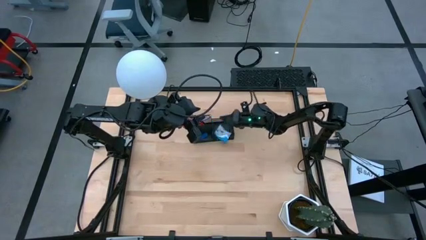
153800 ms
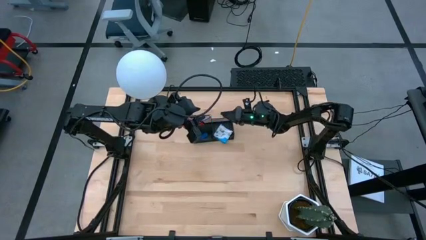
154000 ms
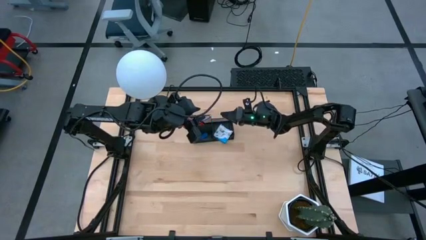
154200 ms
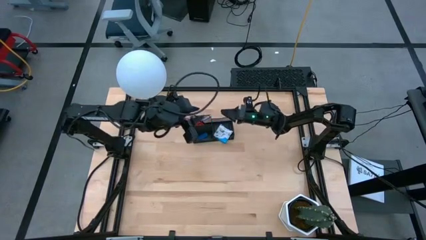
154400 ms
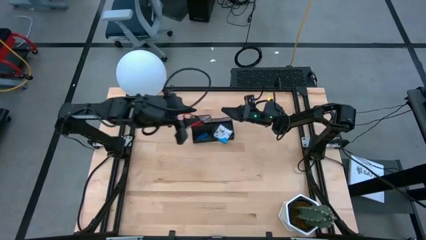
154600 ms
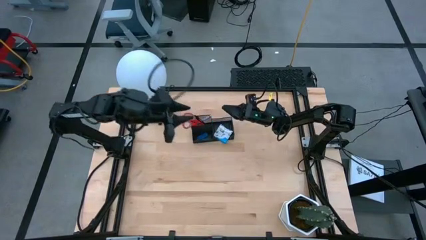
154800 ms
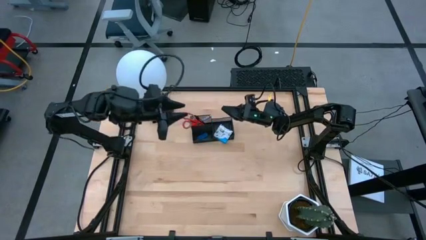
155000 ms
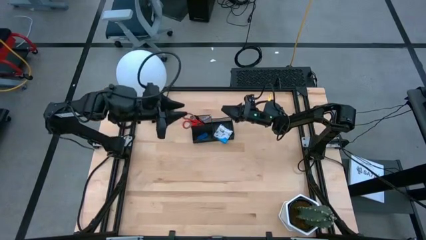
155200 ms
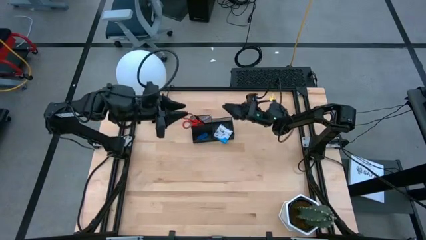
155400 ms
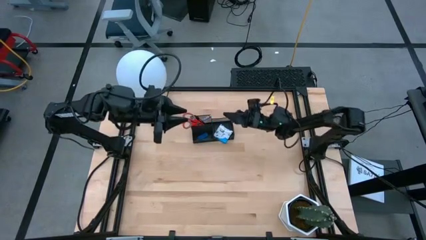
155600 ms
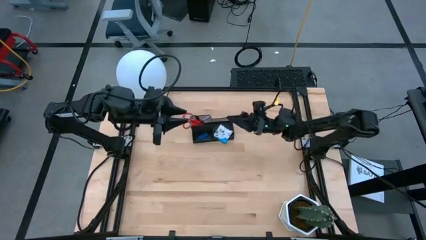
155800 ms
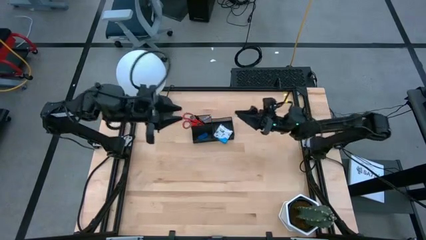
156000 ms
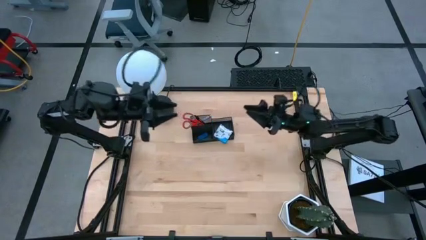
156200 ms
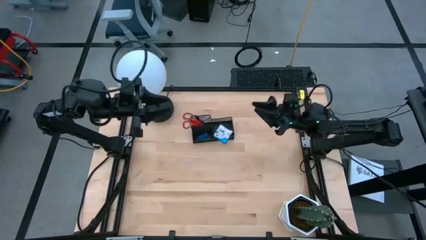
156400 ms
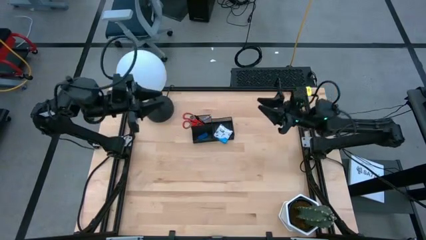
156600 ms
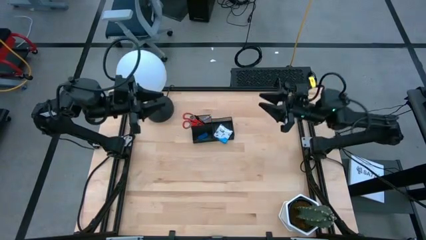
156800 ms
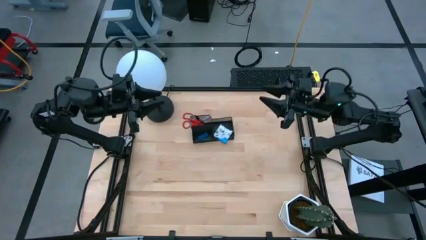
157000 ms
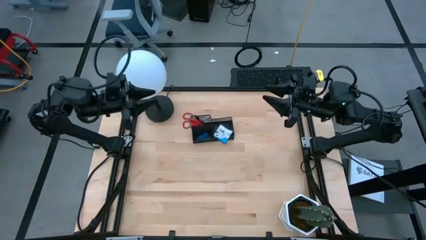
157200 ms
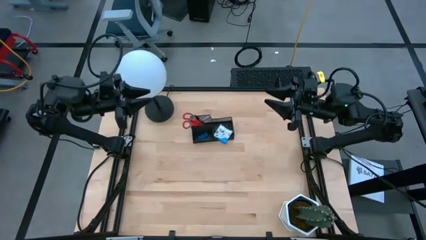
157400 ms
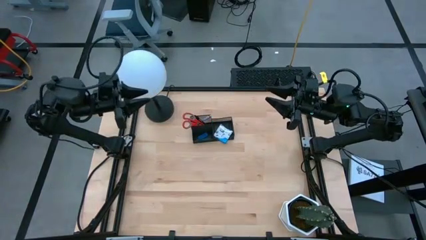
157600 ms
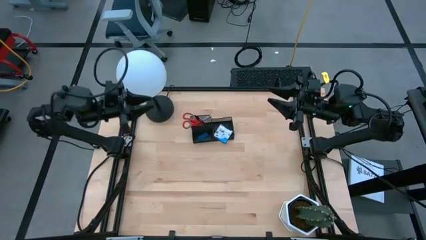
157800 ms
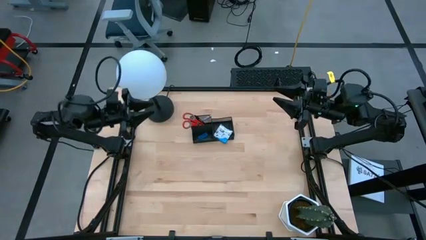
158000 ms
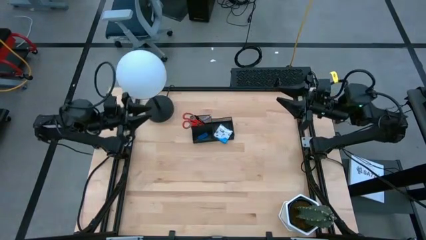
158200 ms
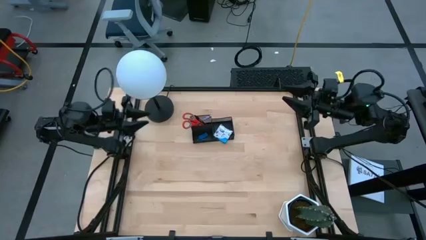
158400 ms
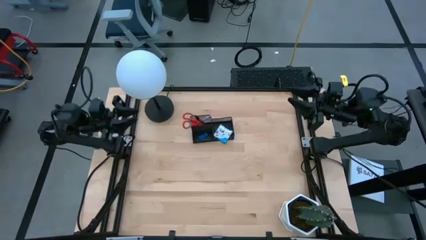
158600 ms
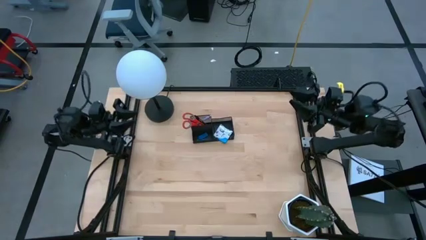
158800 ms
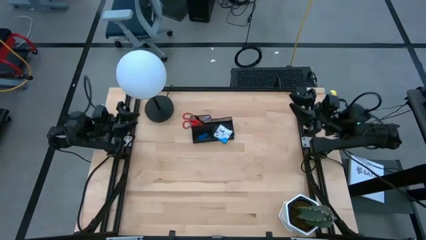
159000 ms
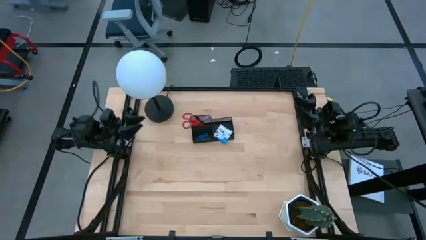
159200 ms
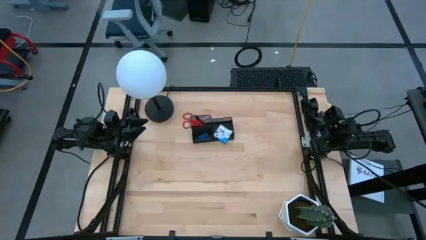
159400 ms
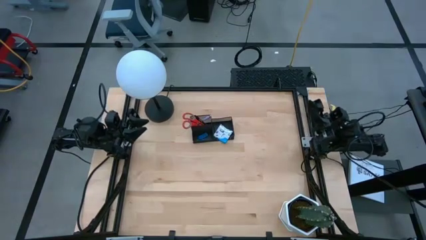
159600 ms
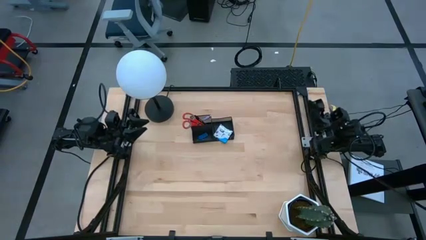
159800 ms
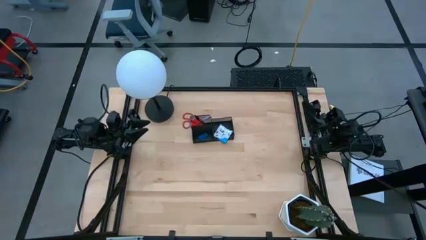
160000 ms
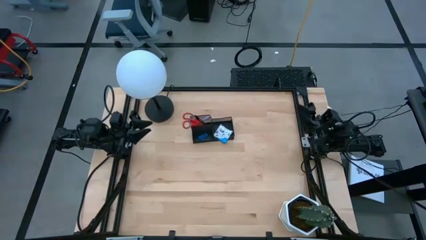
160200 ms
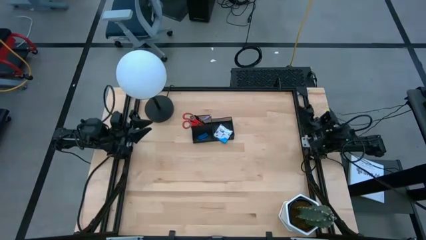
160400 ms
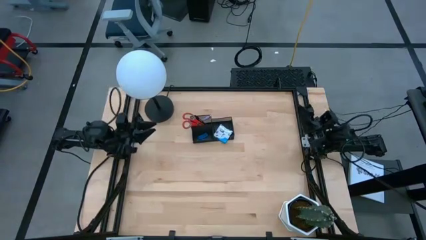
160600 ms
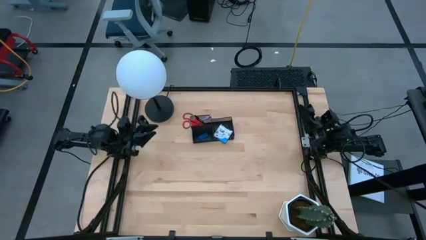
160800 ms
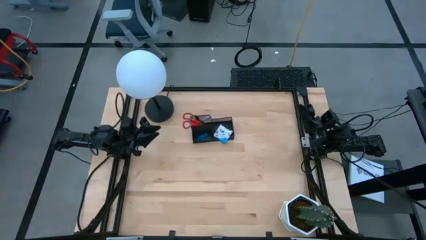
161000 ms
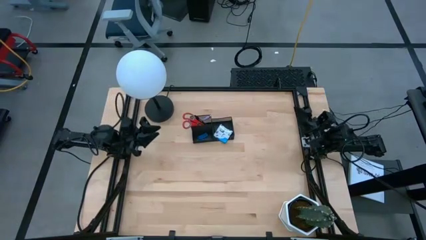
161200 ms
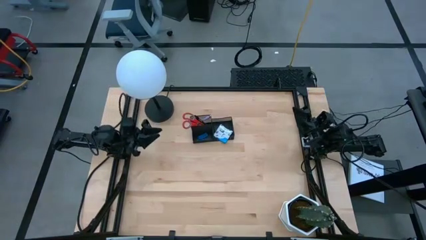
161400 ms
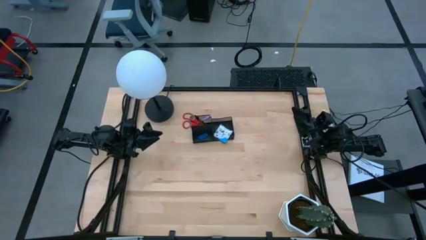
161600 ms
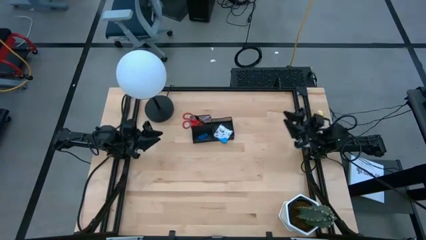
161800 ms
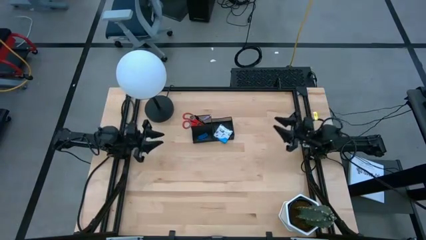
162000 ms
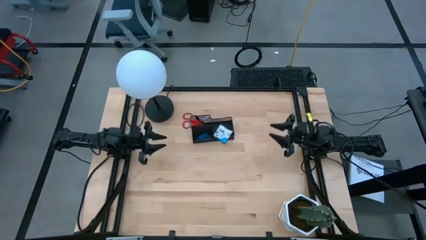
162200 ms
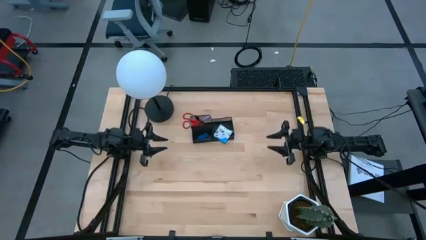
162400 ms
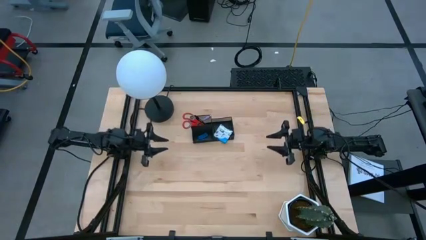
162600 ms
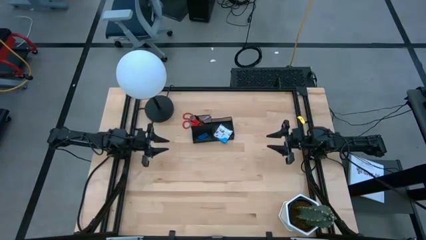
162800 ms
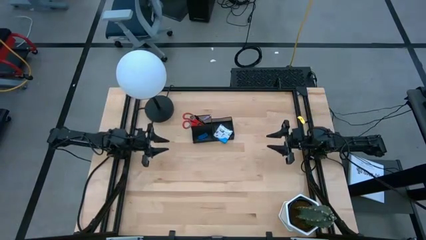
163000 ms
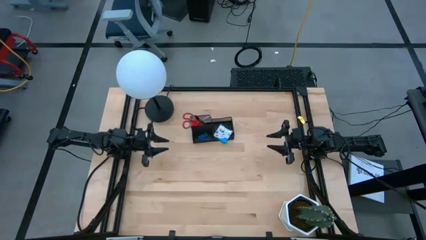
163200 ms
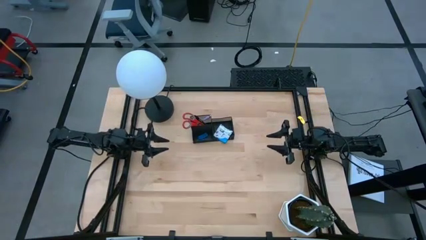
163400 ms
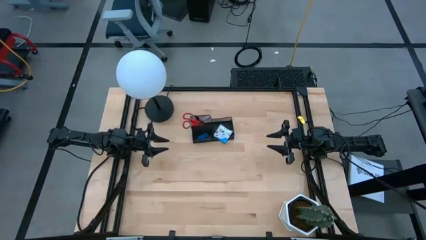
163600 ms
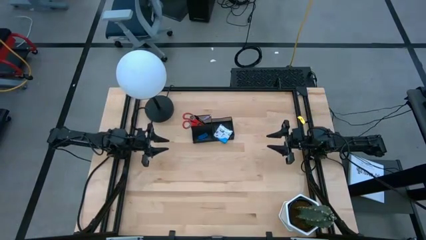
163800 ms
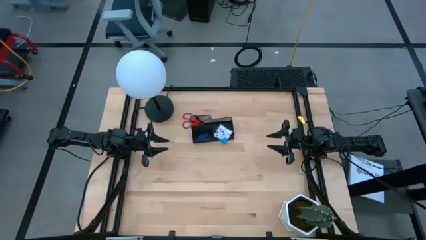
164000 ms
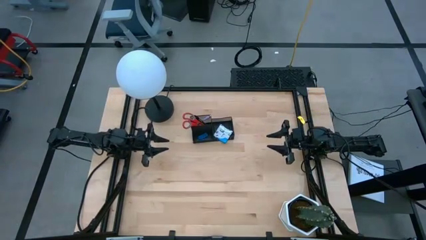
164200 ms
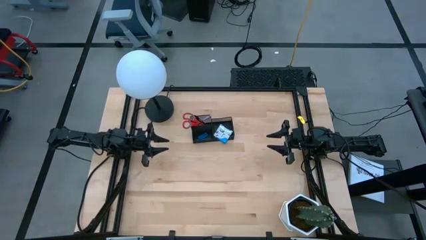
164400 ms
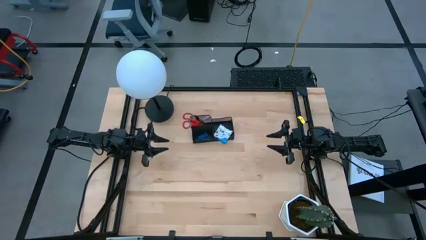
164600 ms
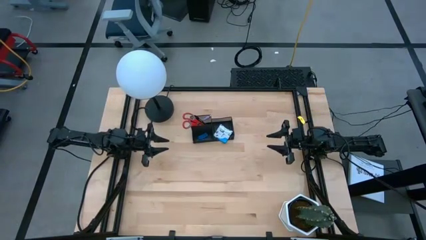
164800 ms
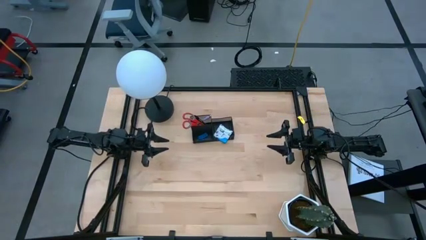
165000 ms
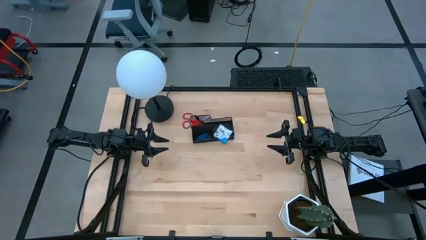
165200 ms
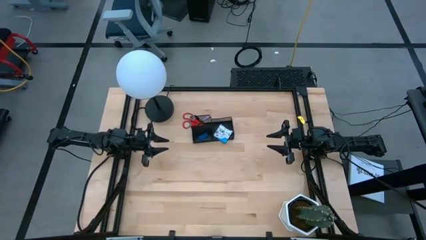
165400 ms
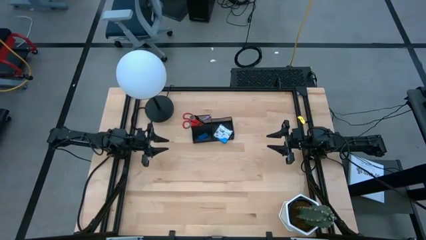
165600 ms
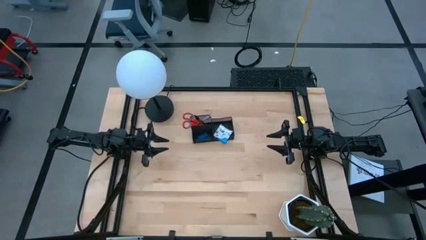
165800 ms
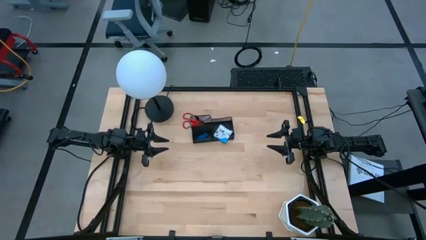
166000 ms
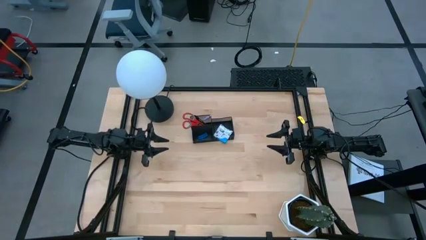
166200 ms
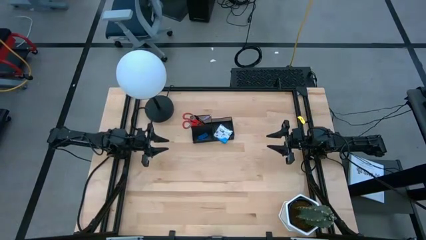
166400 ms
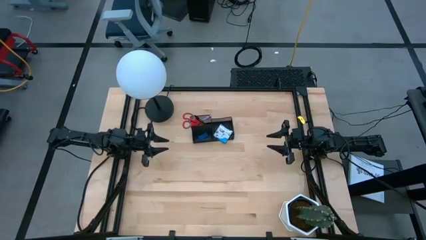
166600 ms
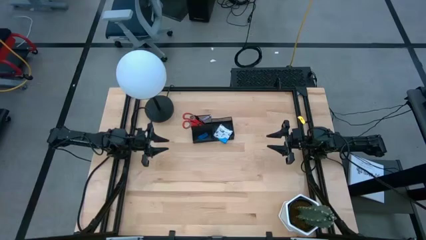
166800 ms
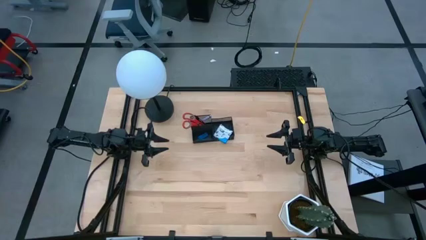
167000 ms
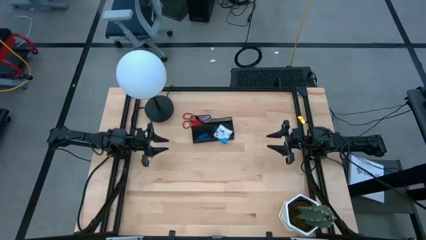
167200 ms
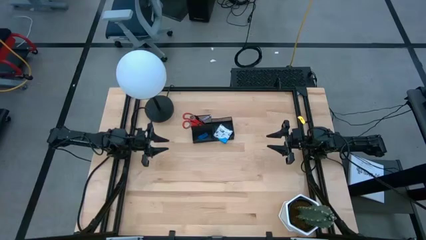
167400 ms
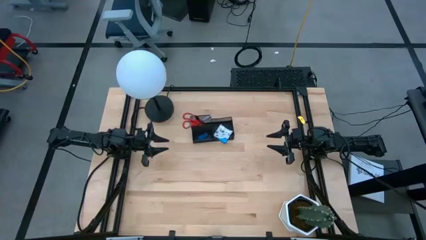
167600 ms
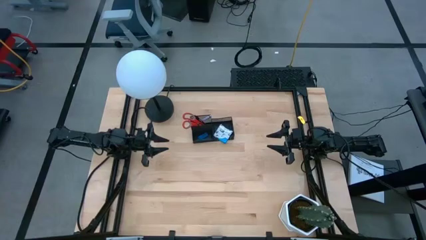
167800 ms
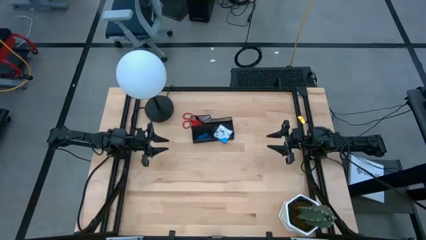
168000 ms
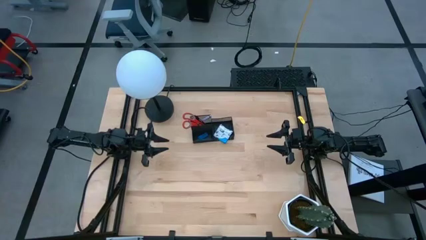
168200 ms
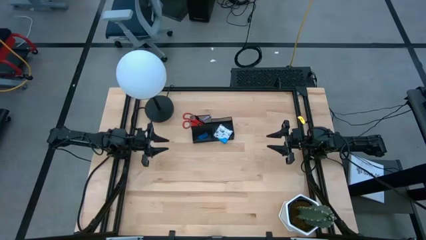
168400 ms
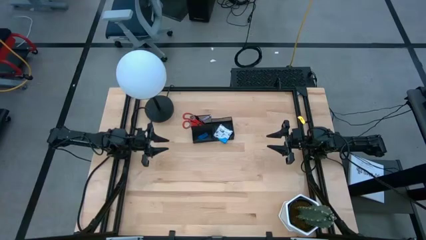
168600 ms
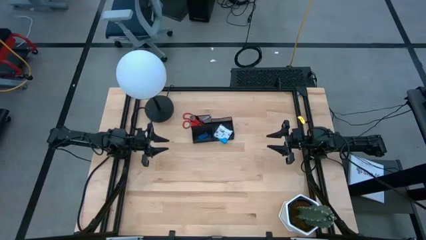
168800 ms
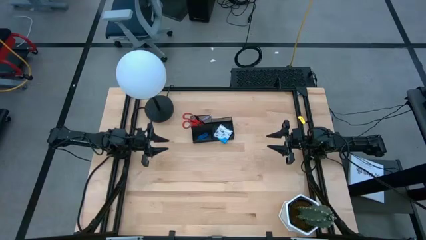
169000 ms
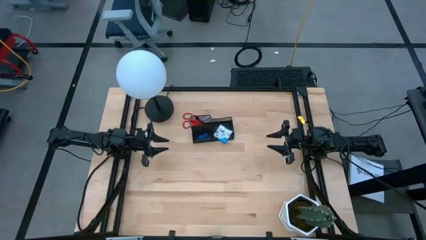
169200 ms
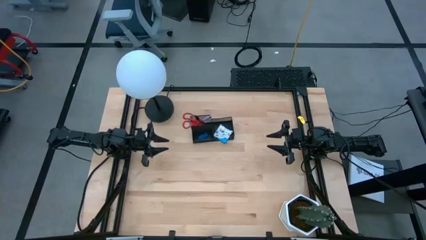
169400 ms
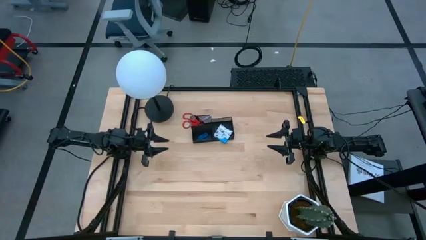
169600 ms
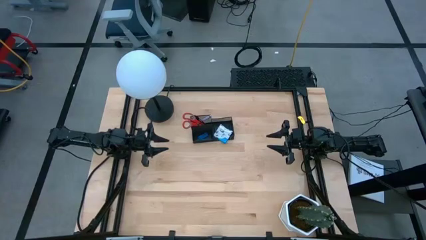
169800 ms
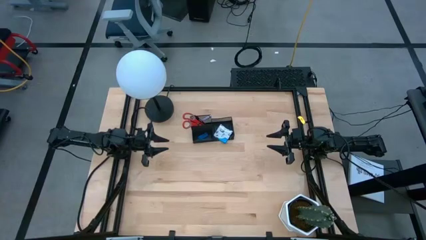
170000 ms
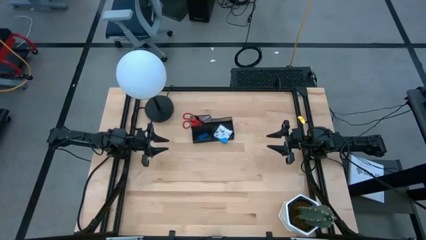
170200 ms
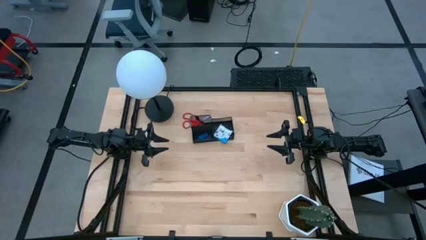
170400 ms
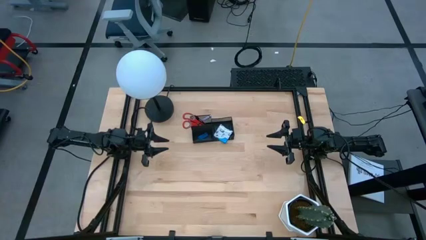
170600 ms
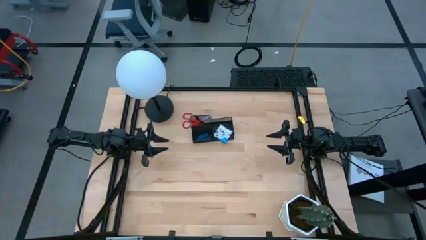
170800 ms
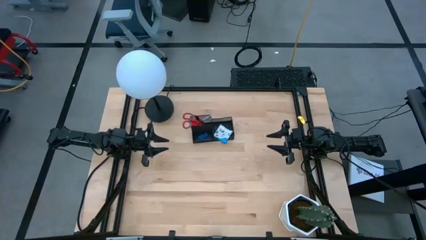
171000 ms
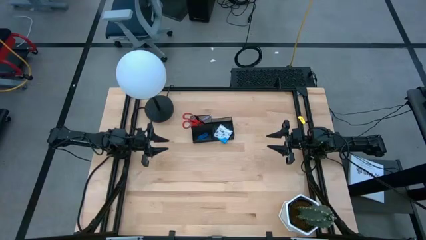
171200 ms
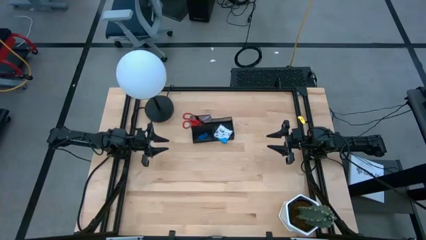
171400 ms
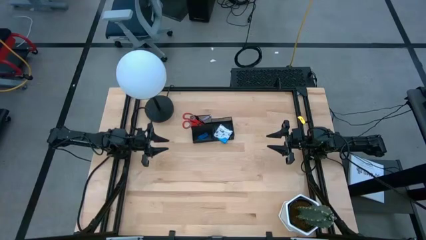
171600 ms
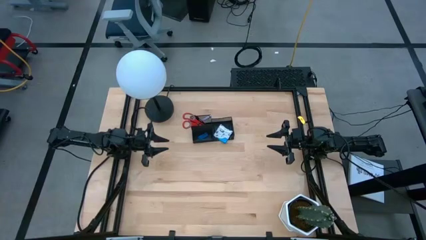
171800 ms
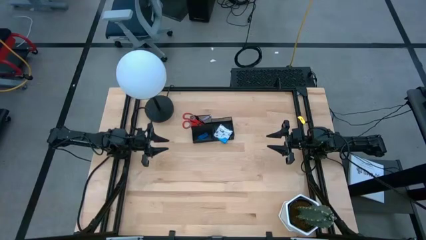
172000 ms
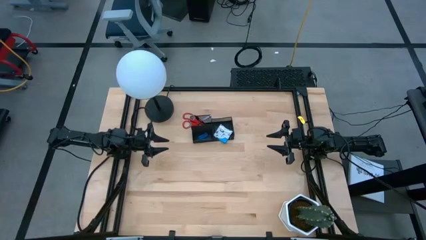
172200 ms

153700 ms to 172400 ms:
Task: Pick and place office supplies into organizer
Return to Home Position
